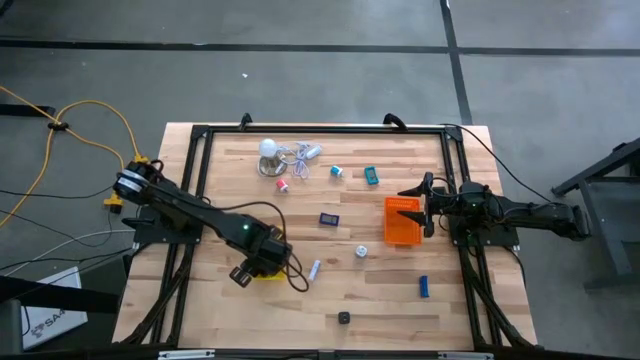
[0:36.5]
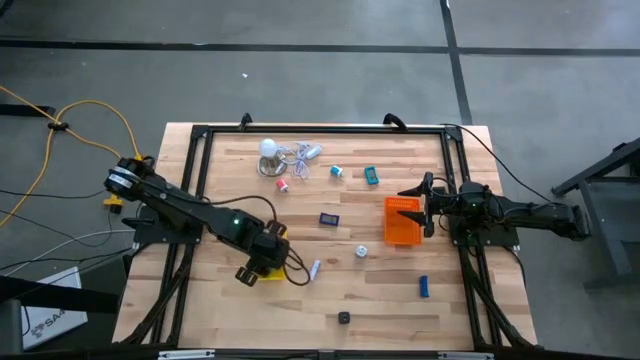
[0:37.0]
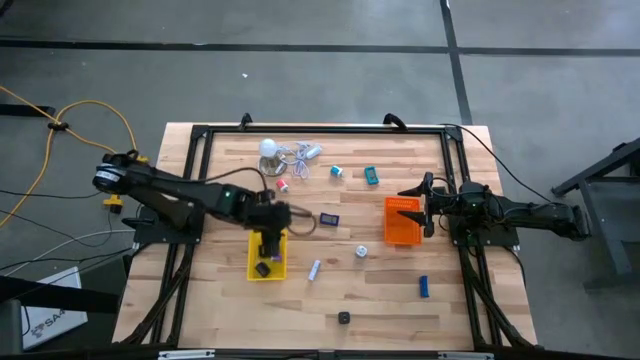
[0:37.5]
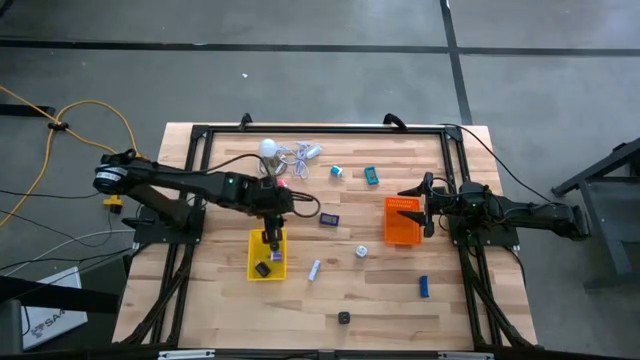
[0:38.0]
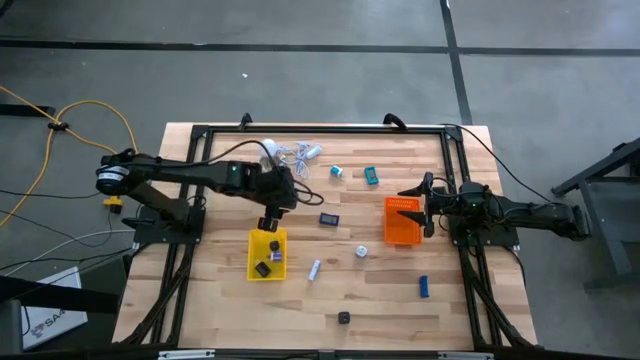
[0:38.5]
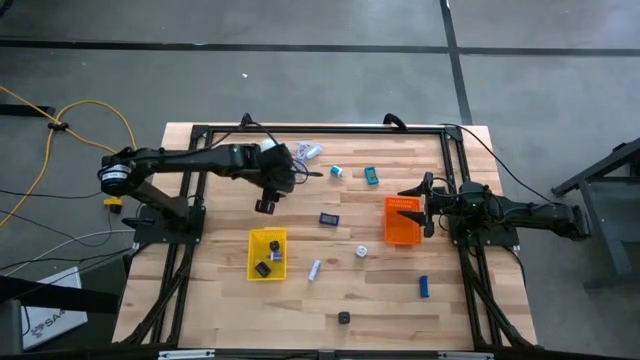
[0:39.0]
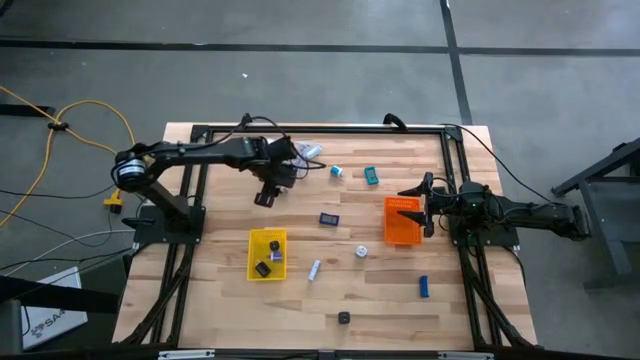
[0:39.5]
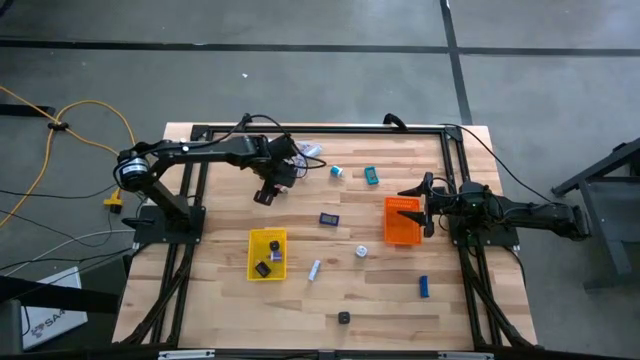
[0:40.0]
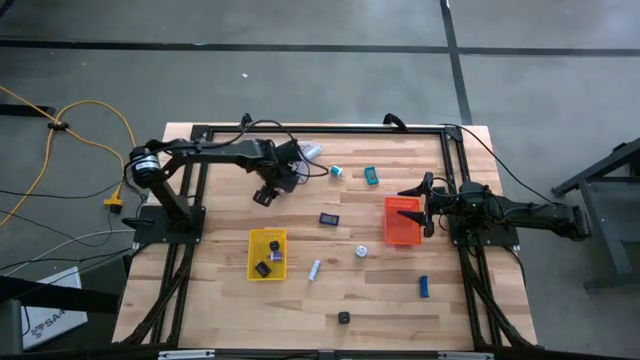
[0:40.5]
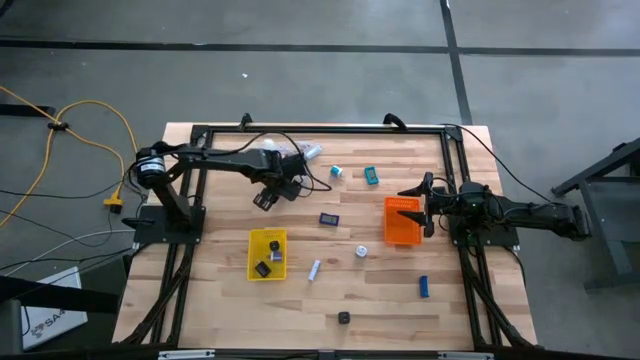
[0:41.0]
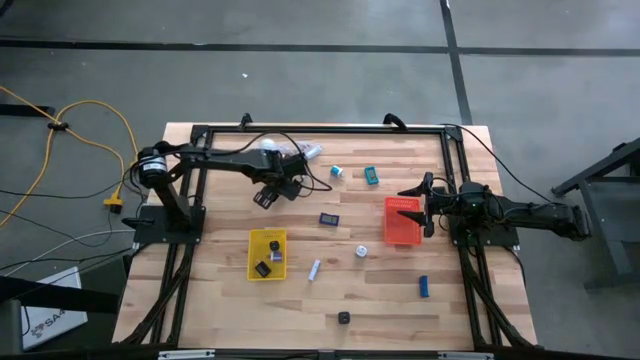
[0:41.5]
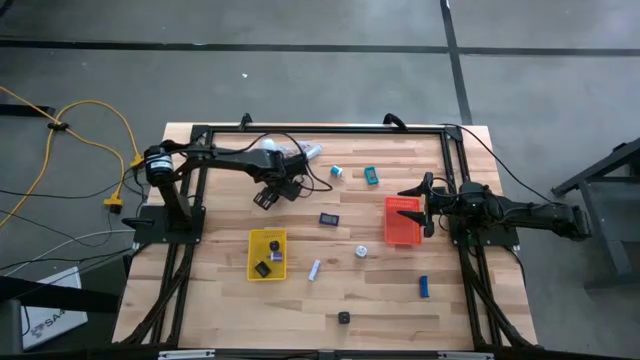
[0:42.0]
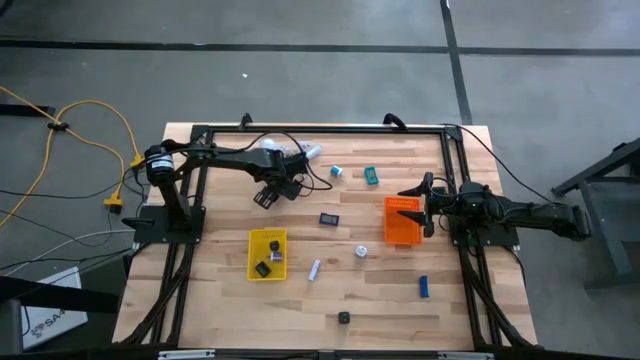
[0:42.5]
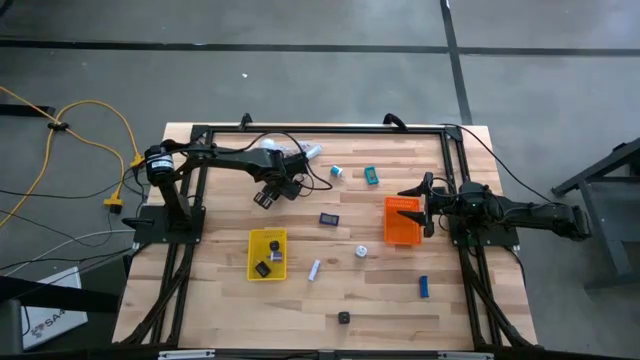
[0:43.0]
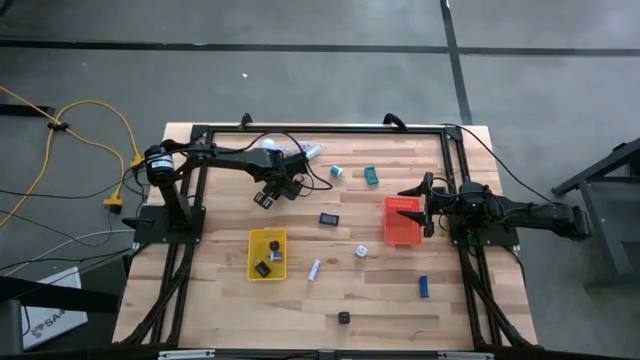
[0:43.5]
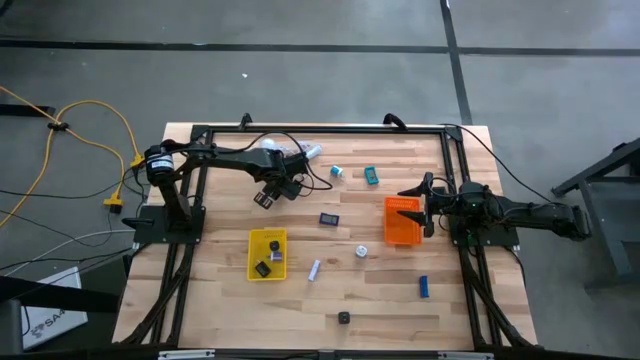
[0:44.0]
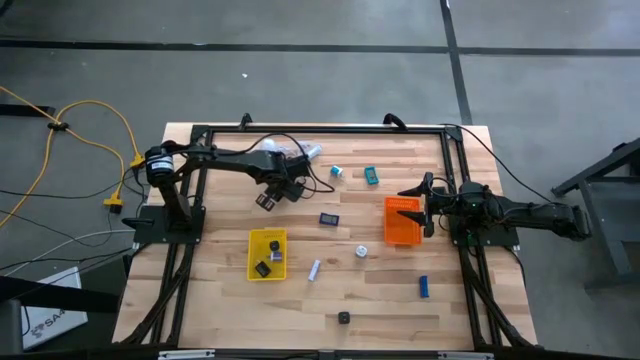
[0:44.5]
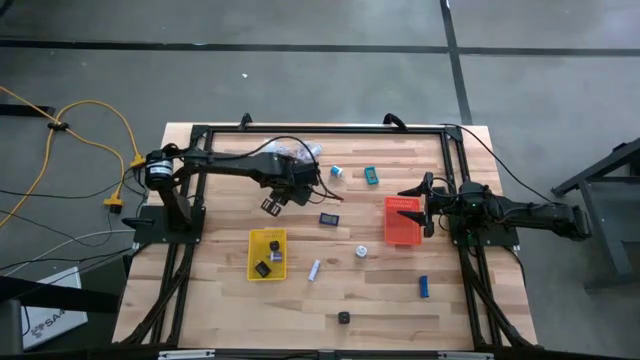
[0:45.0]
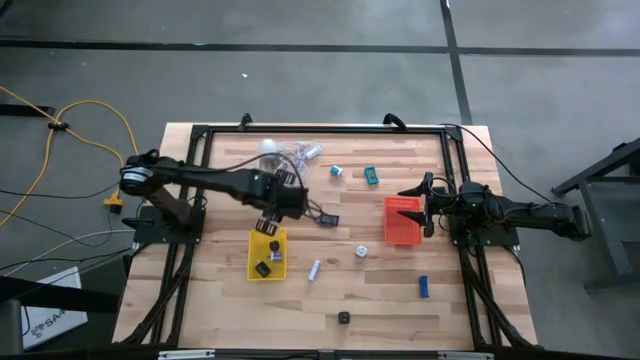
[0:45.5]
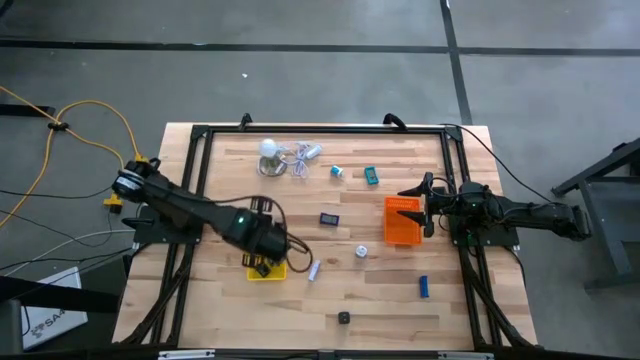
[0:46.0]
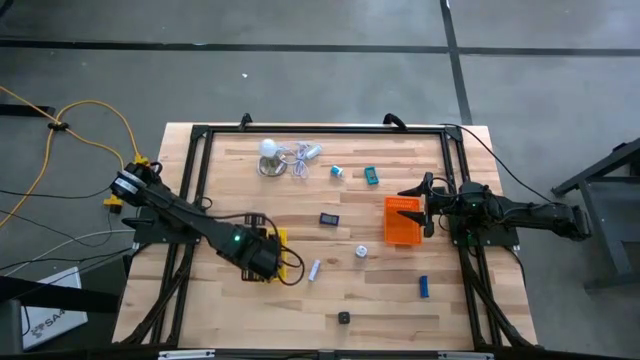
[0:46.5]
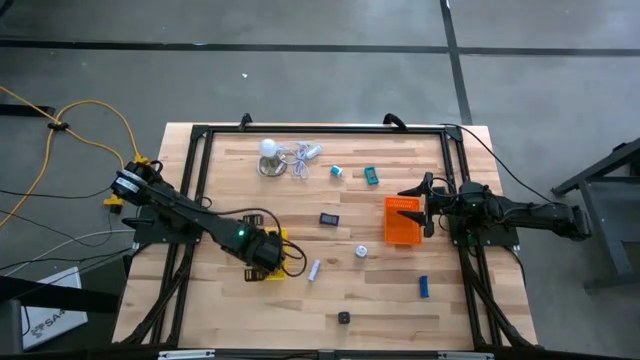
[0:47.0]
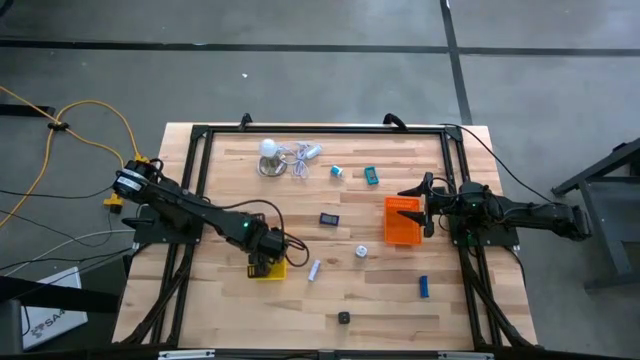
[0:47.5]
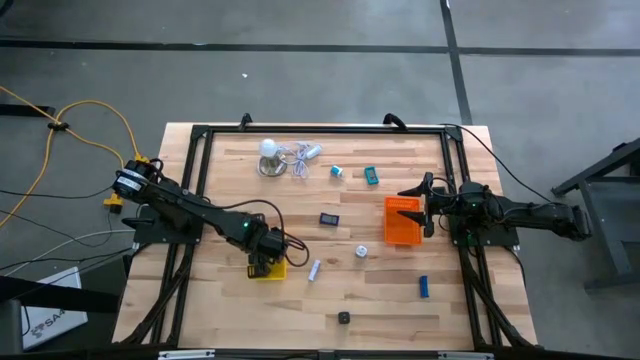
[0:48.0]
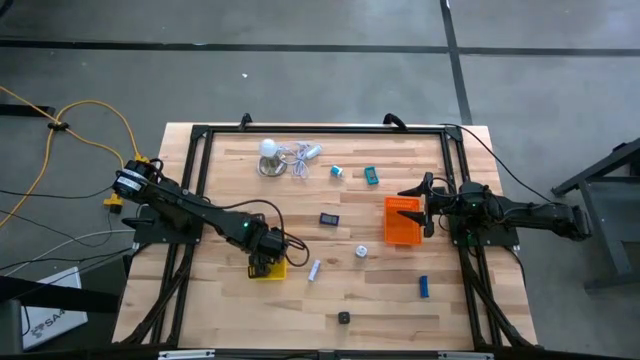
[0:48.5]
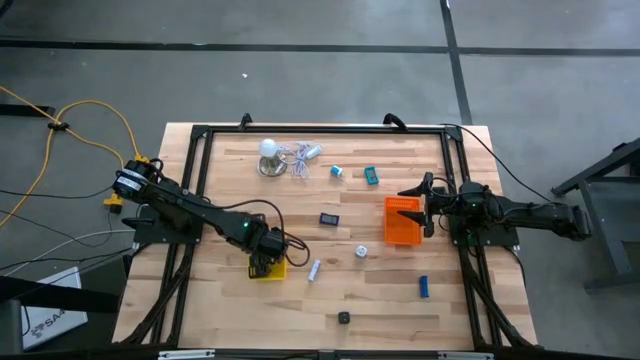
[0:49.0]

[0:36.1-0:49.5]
Task: Pick & Place Office items
Put the red charger adapter into the yellow bin

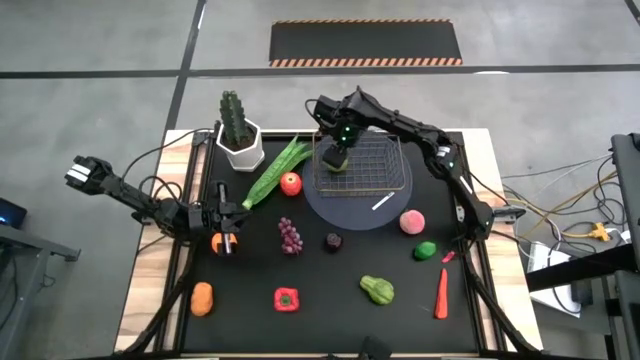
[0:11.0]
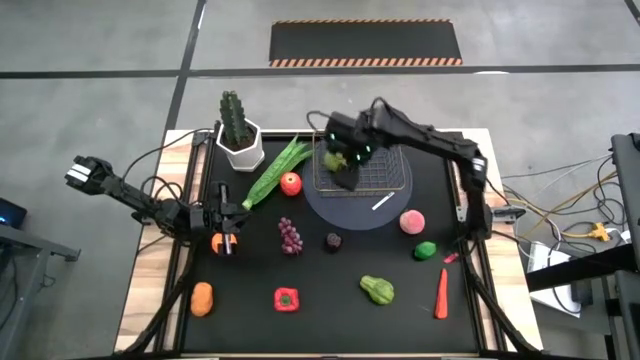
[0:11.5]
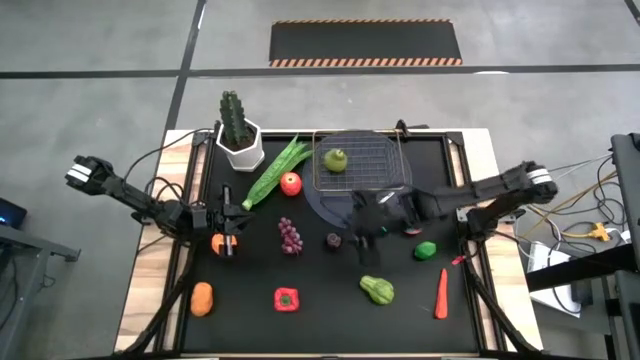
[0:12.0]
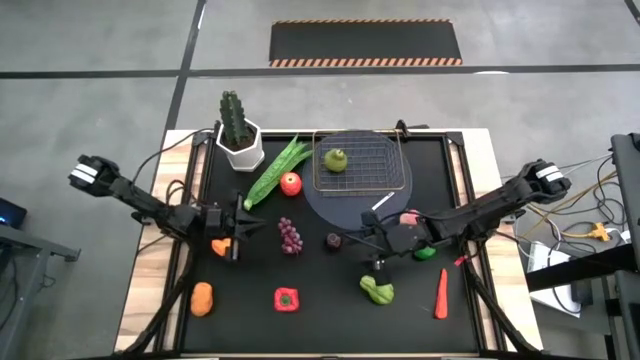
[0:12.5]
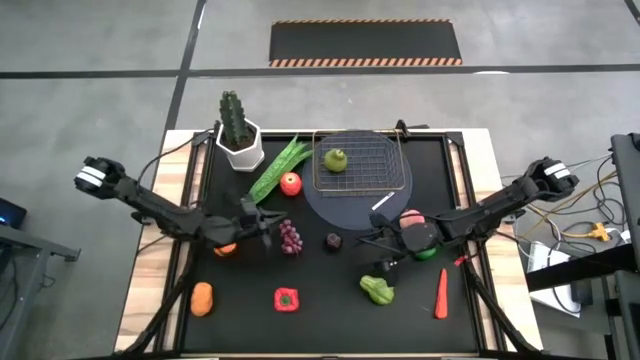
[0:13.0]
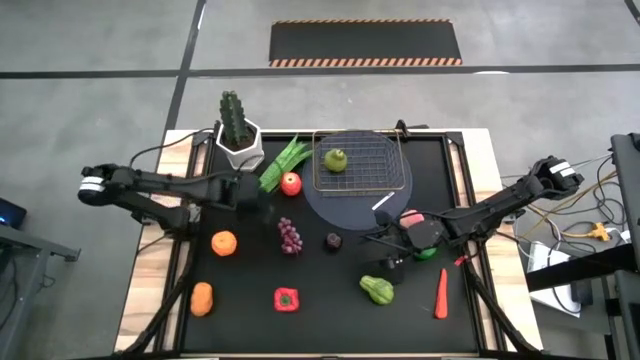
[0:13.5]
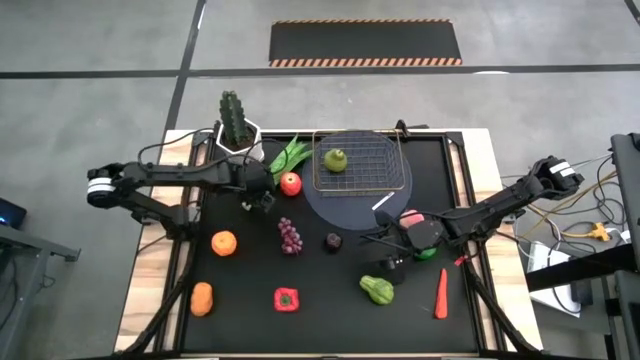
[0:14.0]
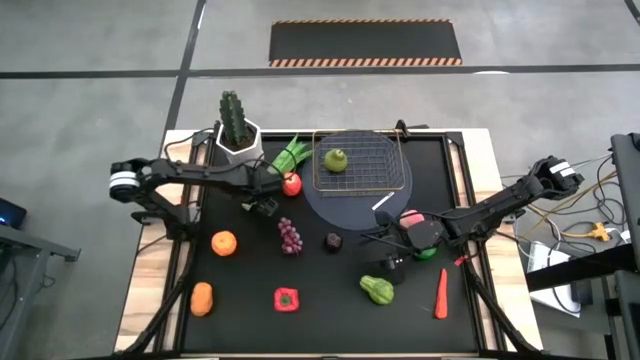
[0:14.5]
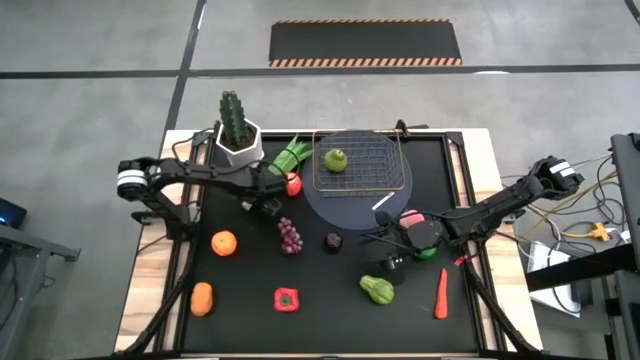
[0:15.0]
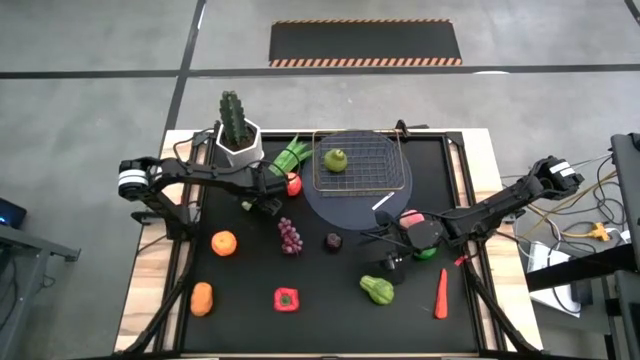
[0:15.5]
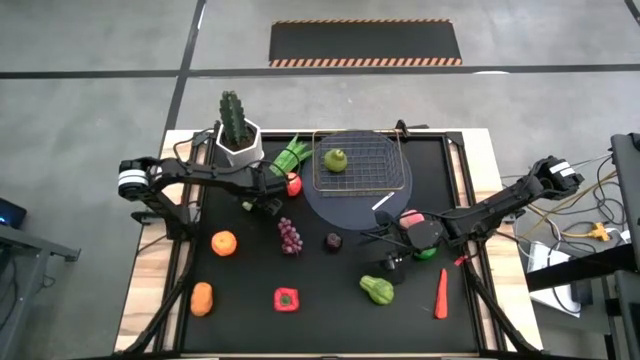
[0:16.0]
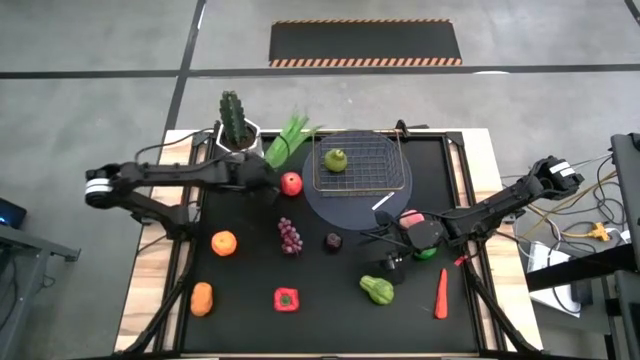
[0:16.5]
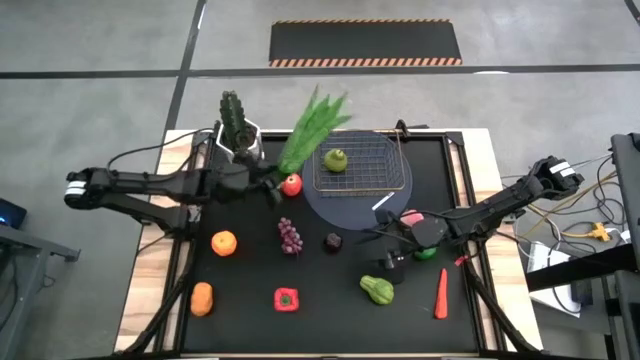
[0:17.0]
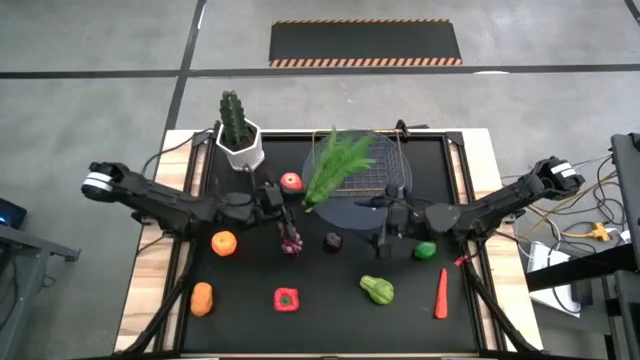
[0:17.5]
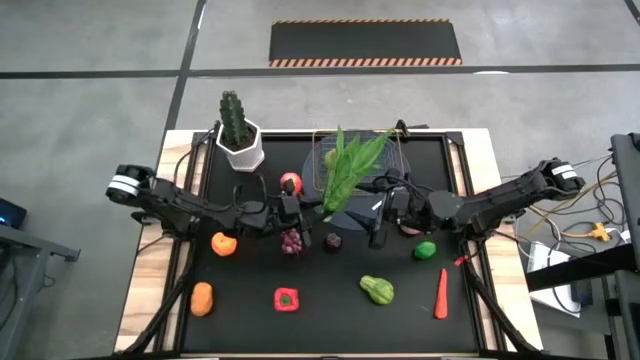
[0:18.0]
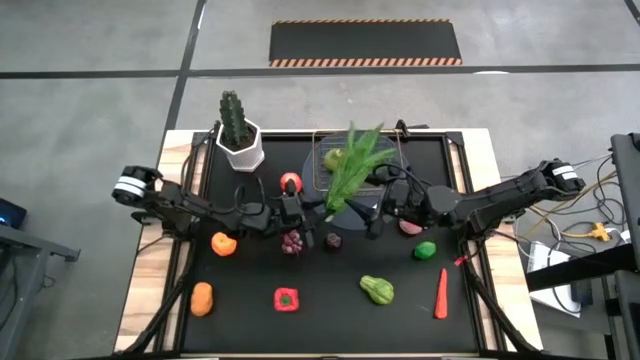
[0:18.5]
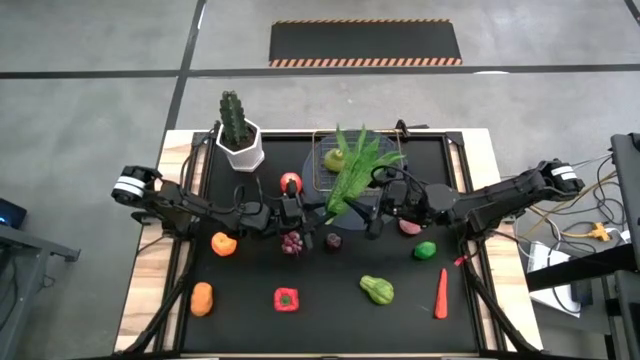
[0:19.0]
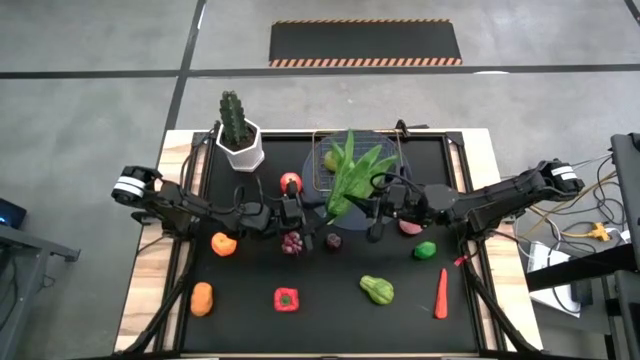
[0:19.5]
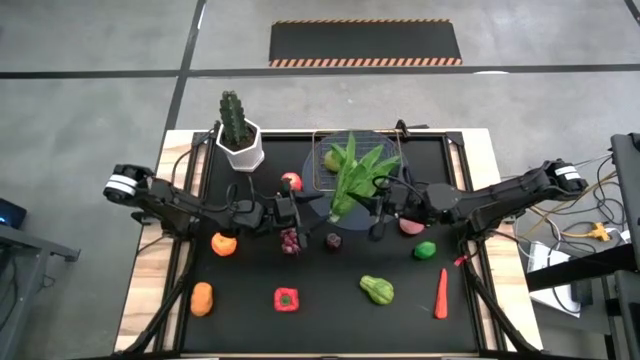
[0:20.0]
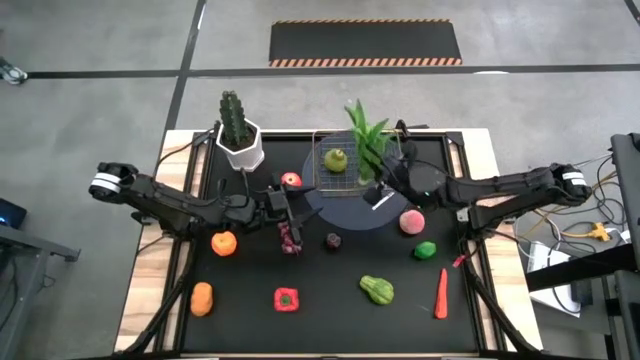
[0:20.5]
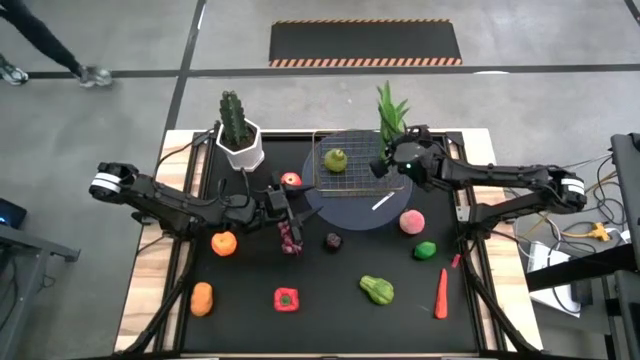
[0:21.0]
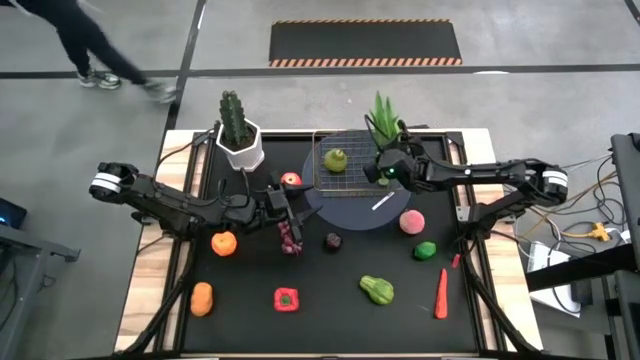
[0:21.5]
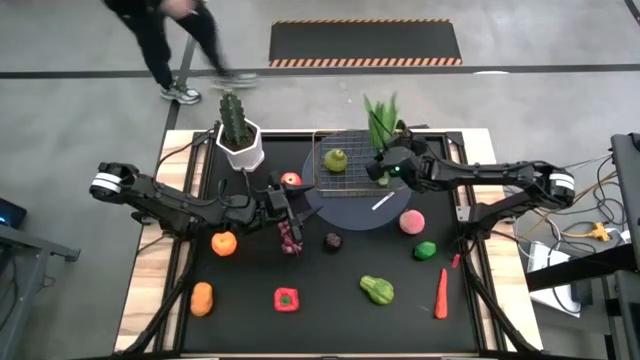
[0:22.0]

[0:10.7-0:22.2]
Task: Build produce basket
Put the green leaf lettuce into the gold wire basket
